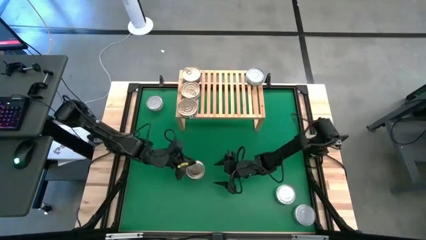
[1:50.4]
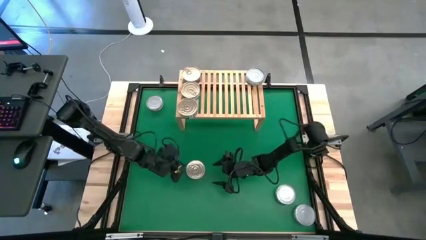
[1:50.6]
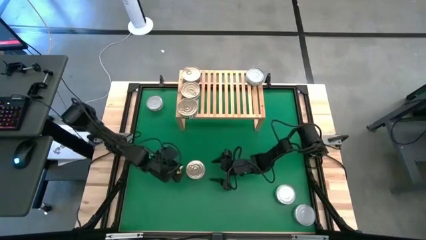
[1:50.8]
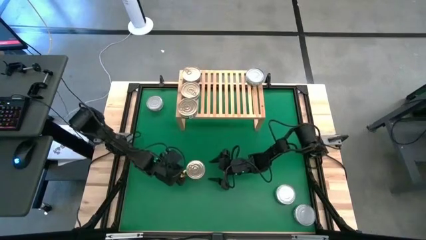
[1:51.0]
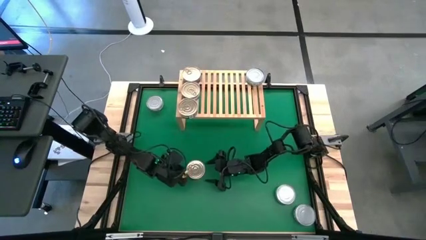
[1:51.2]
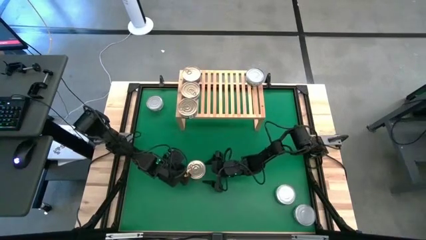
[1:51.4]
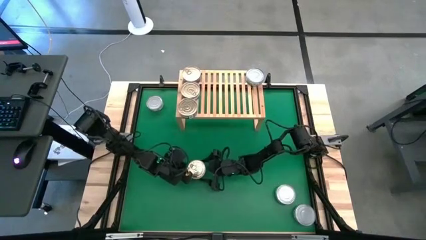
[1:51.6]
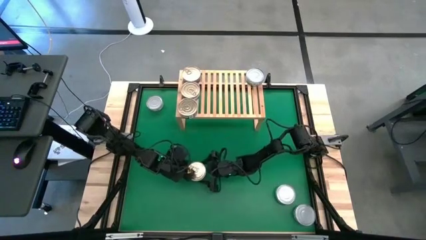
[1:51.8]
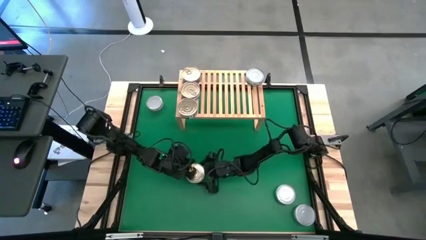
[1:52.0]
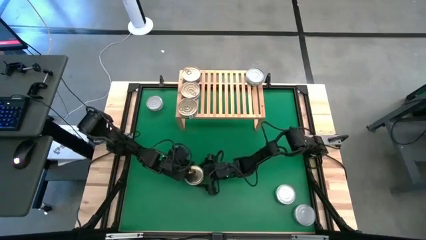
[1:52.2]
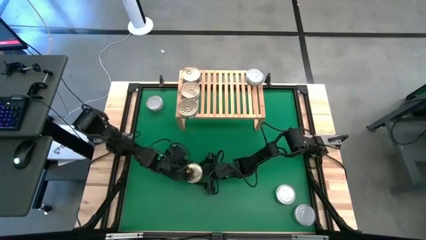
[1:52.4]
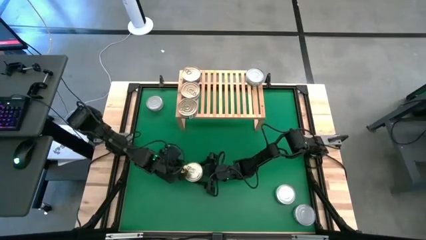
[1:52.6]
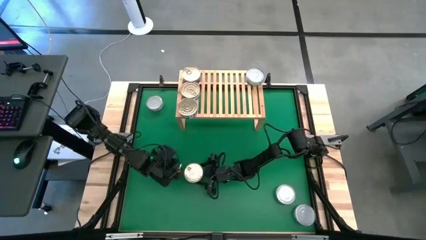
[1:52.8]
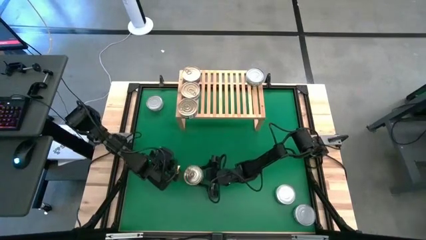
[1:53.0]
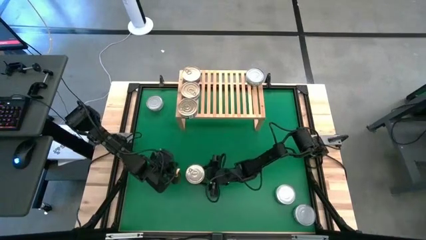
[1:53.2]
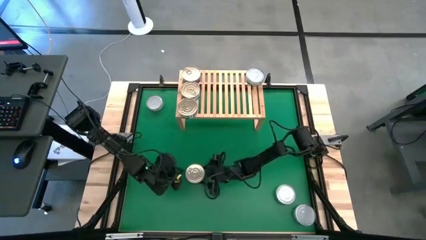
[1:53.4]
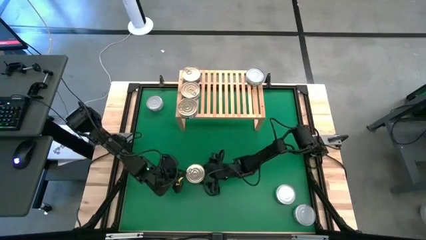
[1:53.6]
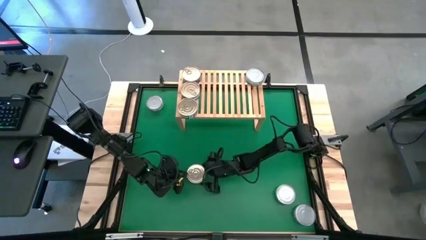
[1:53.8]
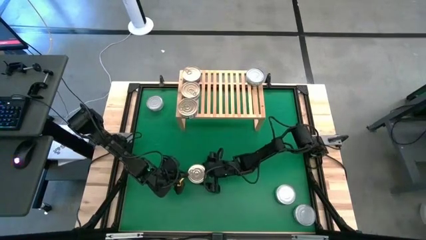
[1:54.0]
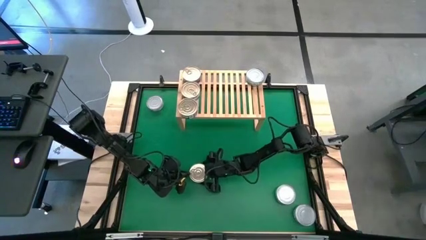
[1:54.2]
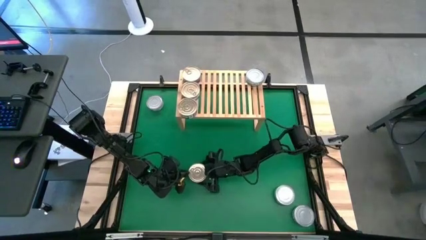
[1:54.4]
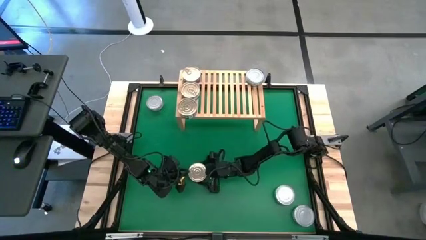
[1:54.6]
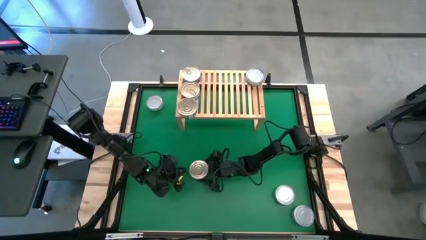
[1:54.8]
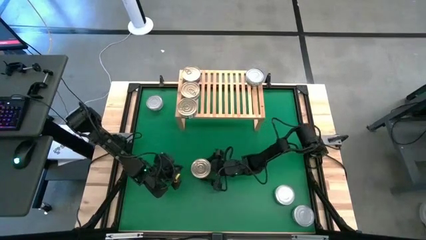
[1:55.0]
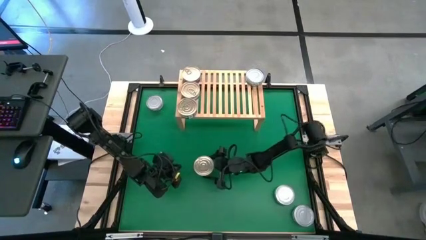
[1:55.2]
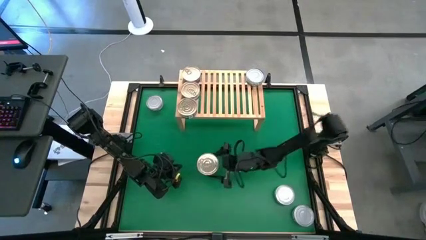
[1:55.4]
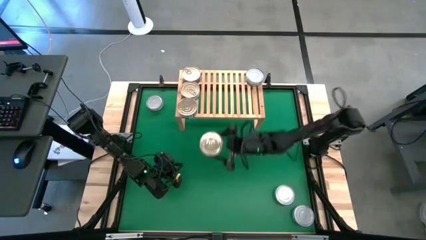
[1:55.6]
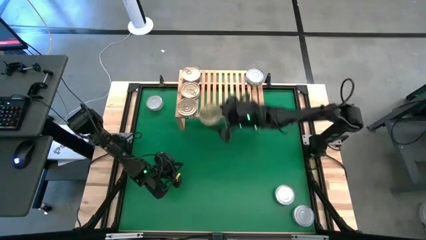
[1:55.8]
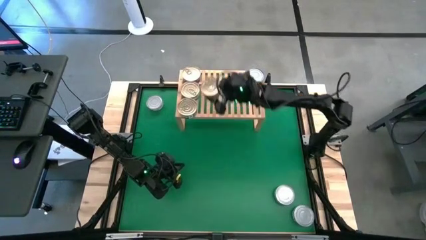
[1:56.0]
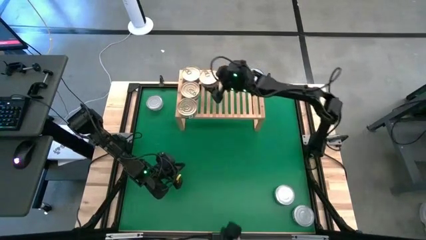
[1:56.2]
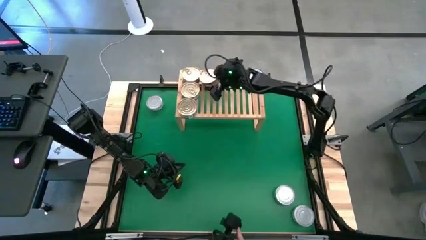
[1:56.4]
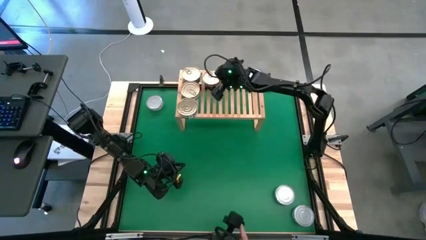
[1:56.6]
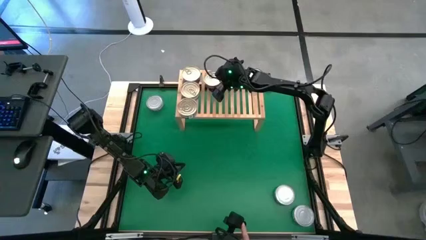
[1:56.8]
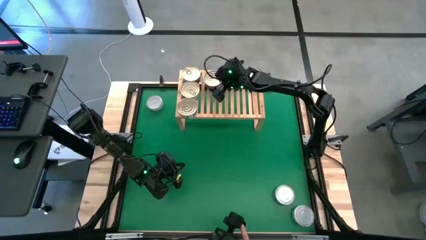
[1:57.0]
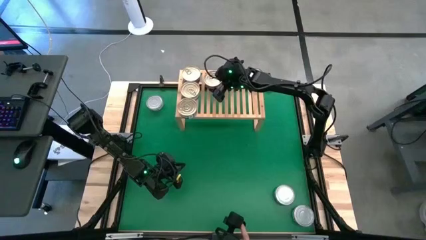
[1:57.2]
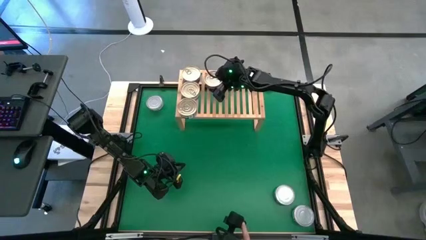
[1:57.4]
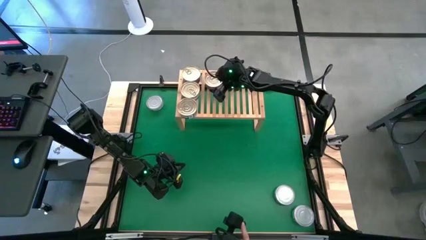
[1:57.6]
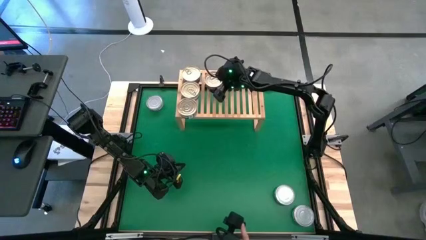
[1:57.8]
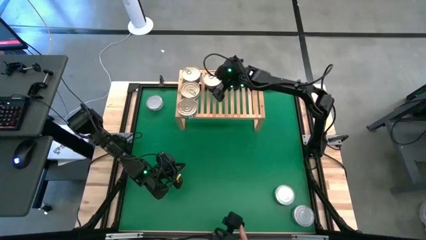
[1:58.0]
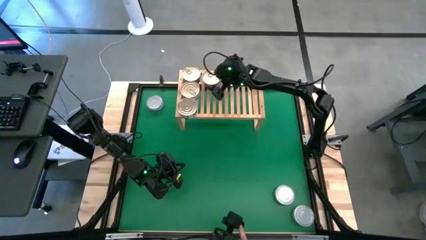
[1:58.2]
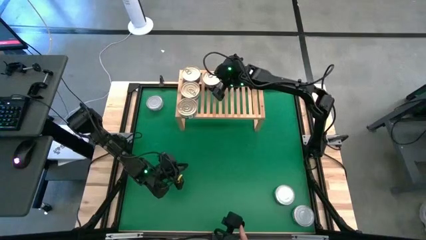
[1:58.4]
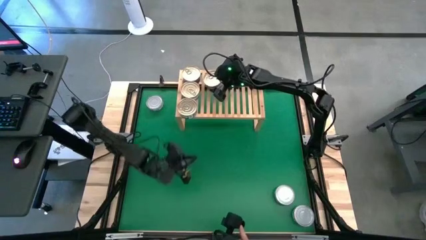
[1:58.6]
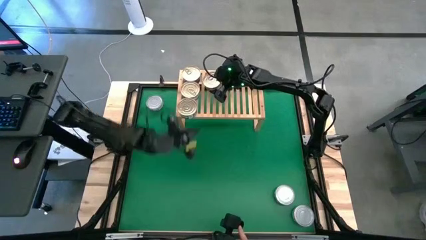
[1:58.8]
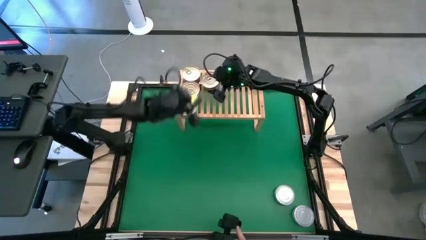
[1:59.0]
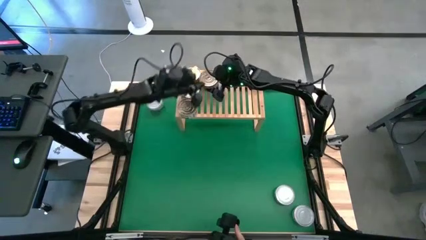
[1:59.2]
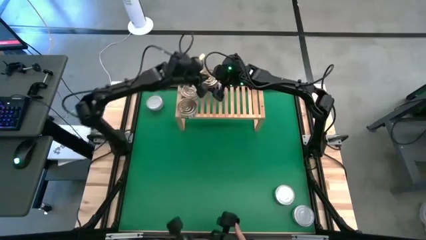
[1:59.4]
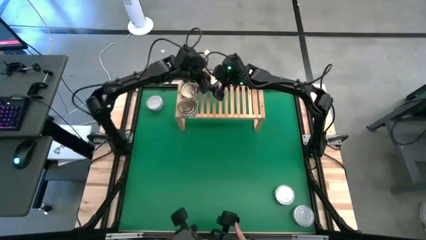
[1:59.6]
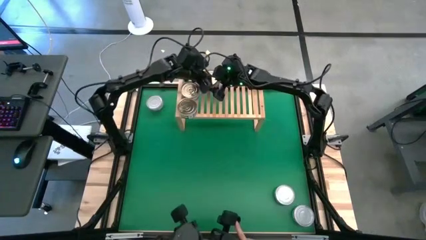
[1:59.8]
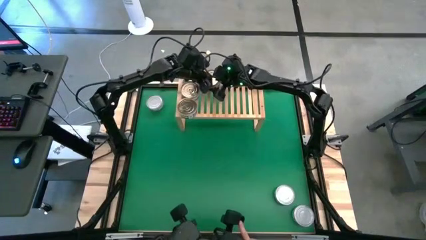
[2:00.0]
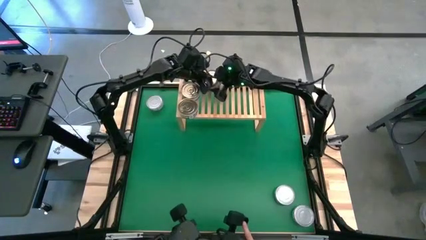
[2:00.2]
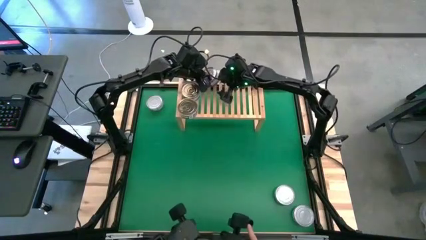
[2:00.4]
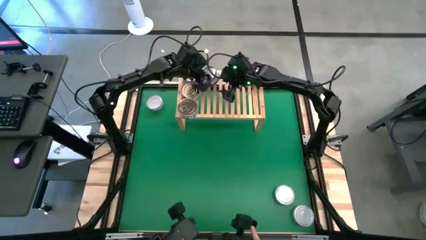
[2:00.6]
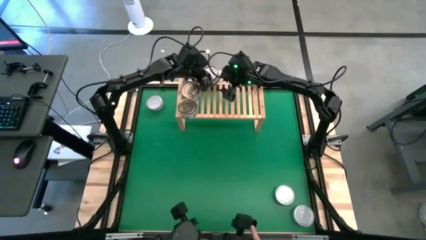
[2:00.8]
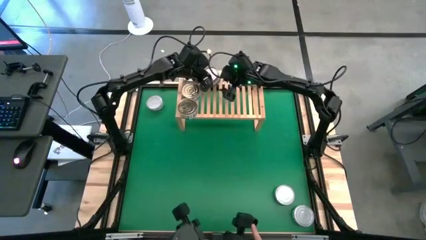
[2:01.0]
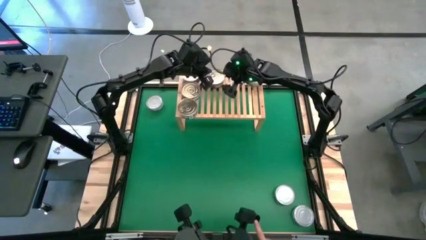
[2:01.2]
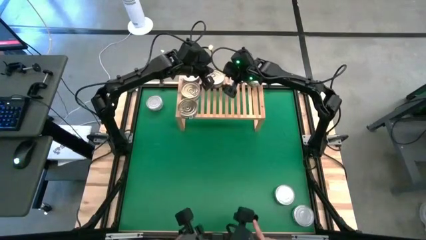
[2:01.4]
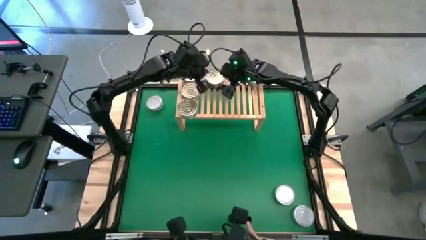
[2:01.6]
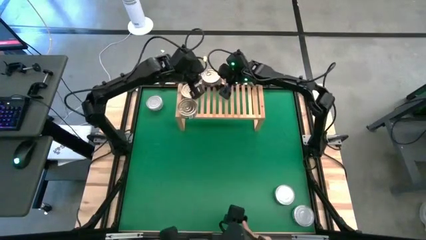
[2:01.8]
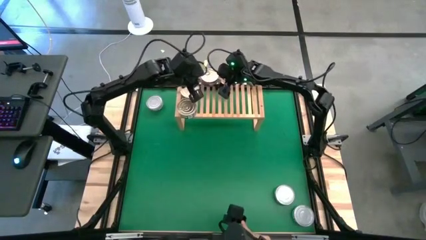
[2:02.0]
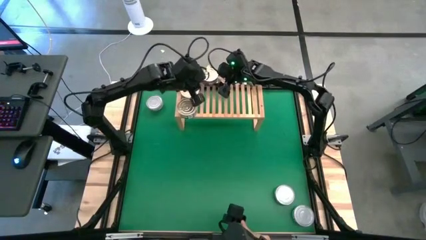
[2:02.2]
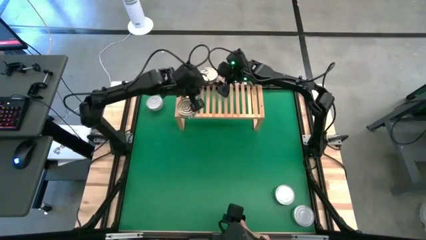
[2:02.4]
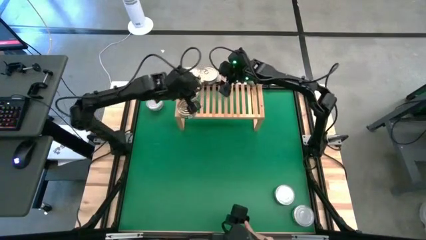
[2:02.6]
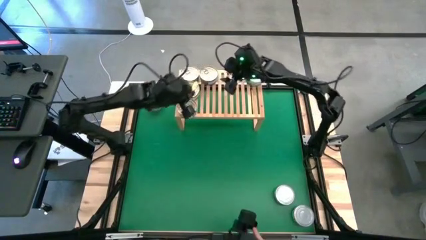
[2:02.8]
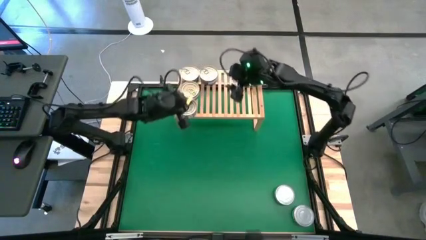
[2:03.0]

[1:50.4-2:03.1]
Task: Stack canned seafood by type on shelf
Put the center blue tuna can on the shelf aligned with the other blue tuna can

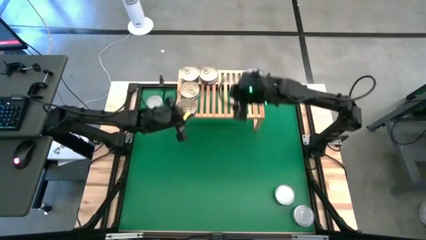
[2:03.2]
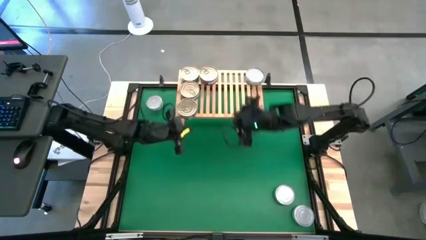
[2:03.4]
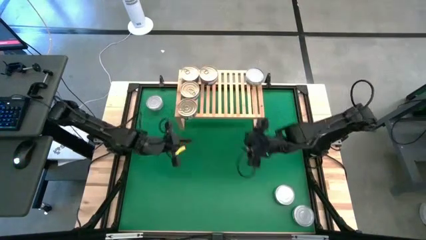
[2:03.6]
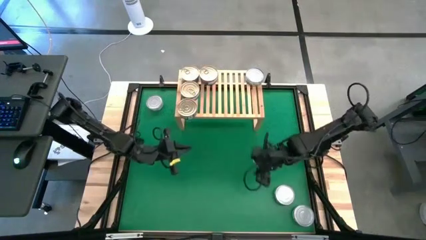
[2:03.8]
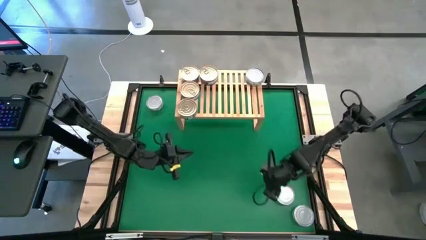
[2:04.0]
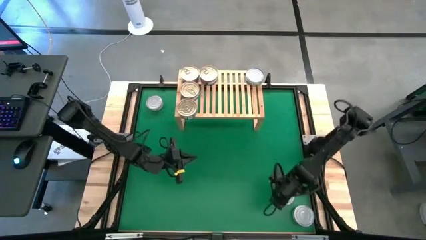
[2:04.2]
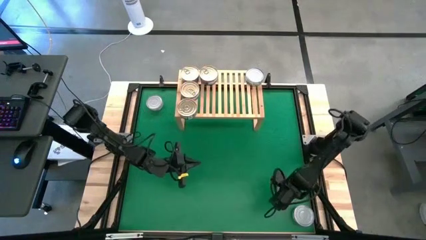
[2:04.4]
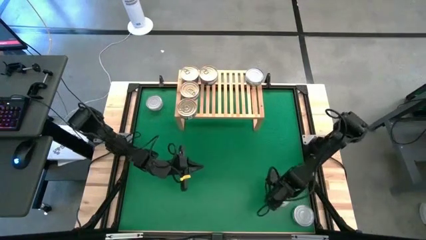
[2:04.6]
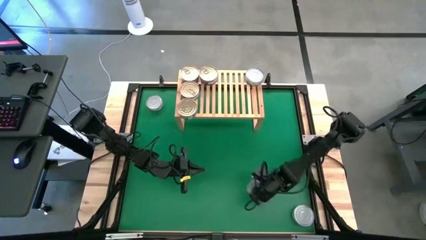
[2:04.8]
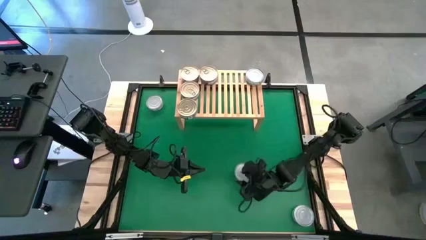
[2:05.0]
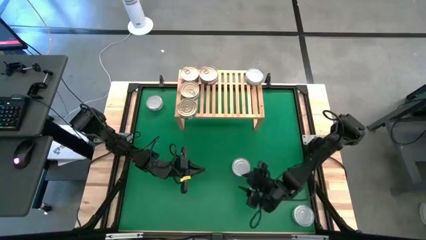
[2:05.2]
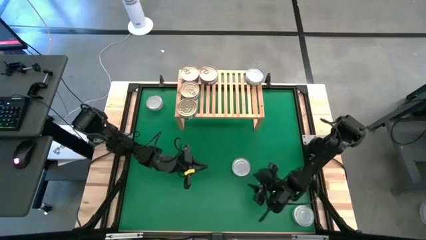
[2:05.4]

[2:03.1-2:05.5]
Move the middle left green tuna can to the center of the table
